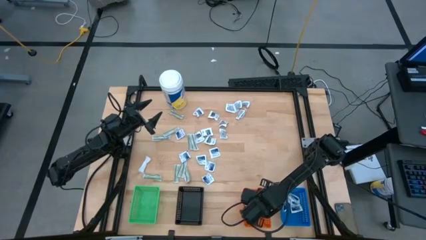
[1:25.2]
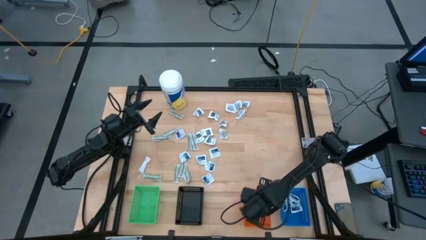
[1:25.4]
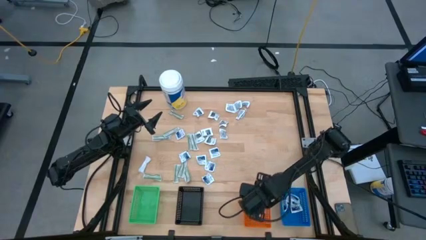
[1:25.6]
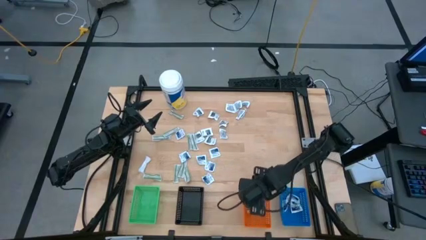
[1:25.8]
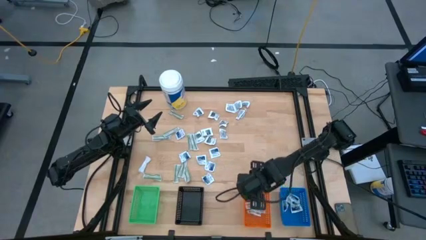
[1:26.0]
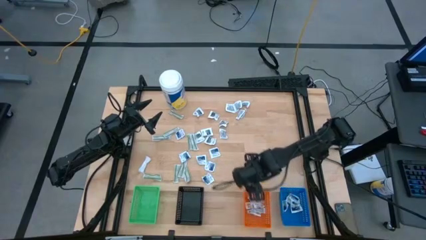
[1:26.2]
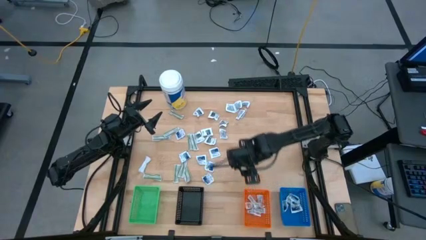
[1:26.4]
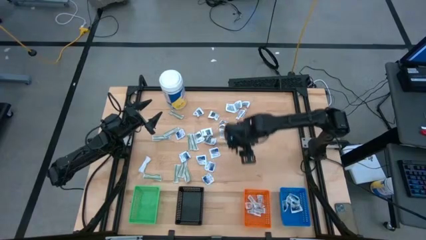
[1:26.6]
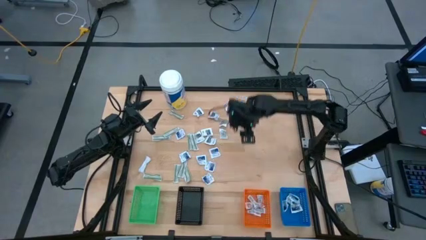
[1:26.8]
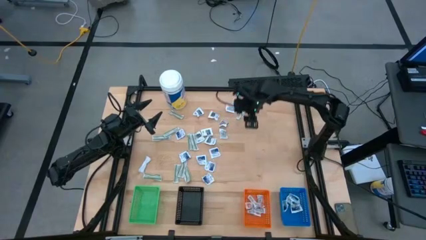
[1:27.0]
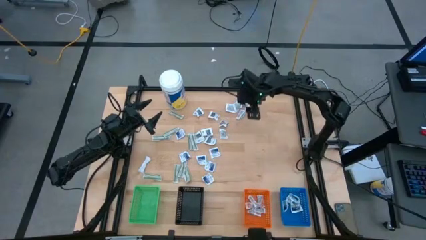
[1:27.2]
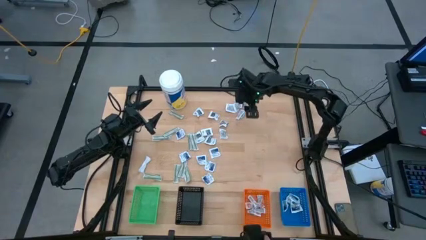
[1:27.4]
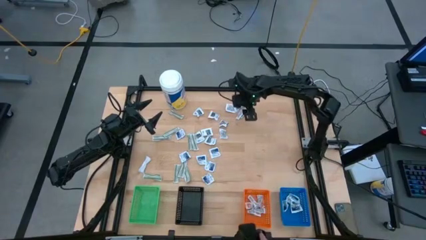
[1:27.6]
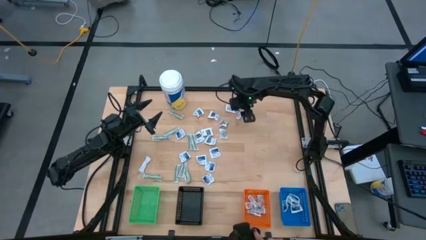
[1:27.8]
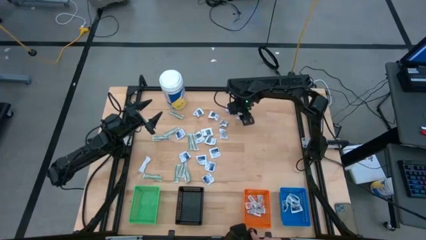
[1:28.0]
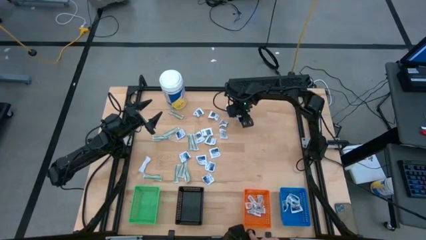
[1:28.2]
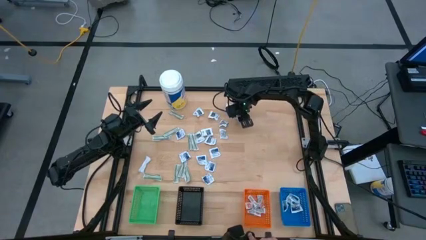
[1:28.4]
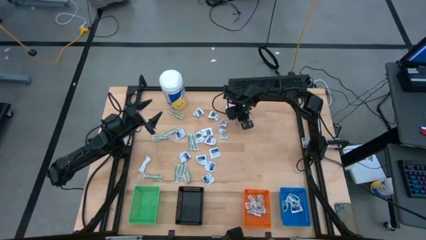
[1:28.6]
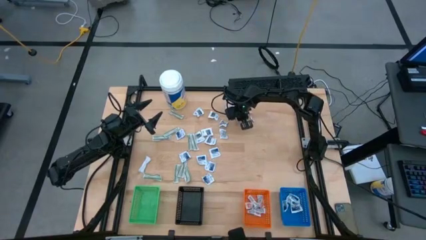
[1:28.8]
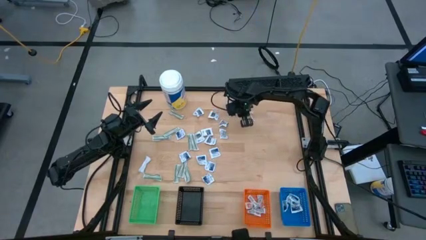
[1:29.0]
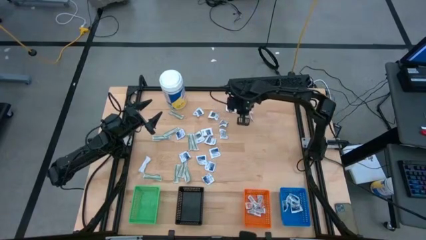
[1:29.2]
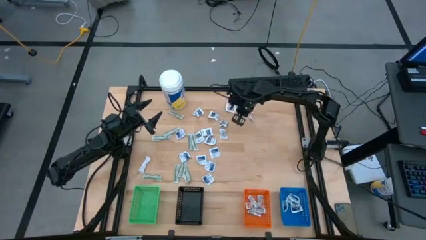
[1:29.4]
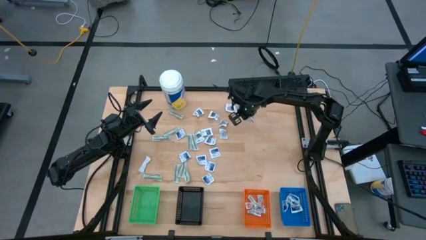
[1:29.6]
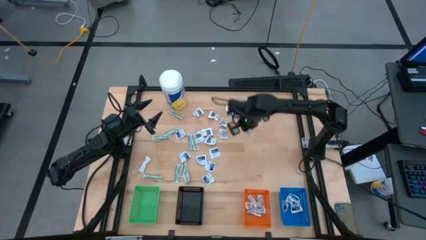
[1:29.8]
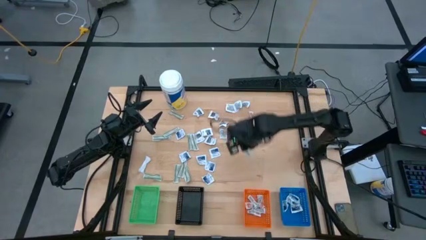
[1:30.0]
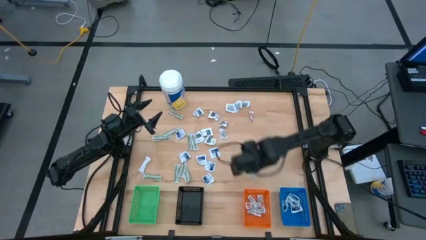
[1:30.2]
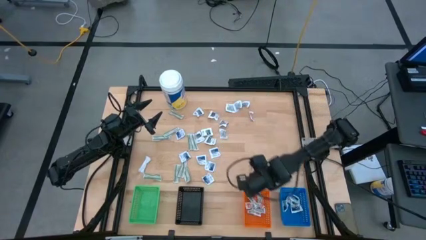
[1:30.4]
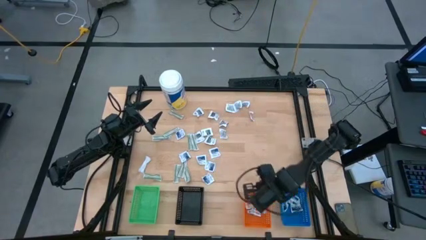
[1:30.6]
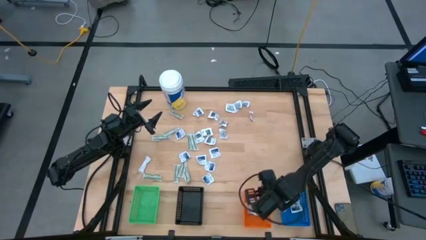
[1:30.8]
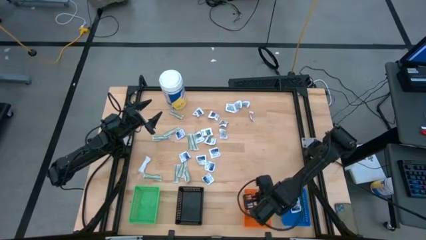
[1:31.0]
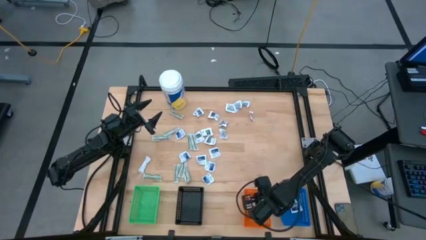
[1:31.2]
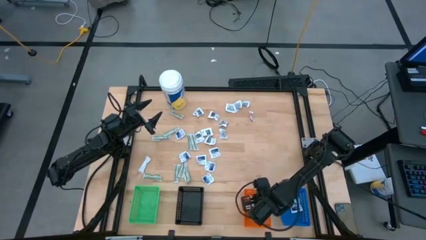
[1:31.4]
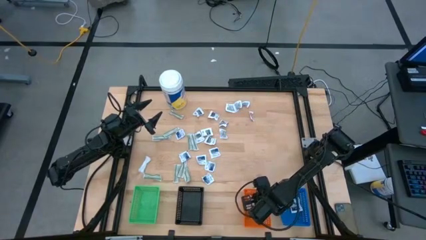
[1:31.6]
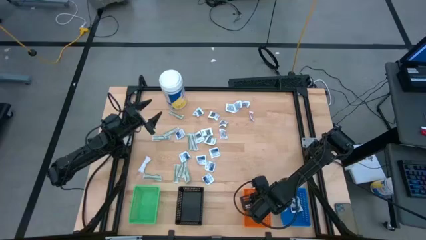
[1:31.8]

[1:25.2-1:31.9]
Task: Pick & Place First Aid Supplies
Put the ointment pack into the orange bin

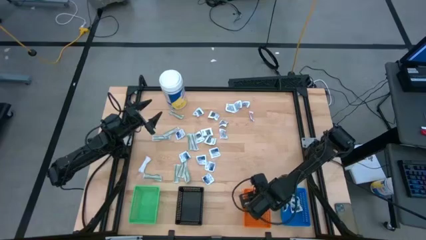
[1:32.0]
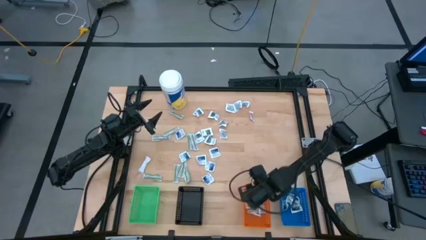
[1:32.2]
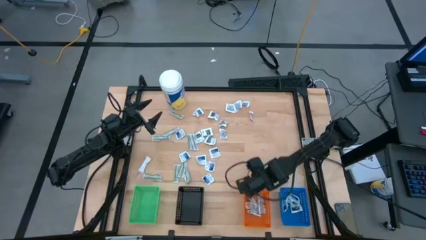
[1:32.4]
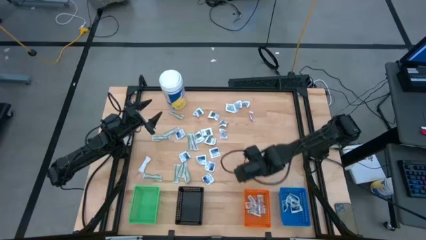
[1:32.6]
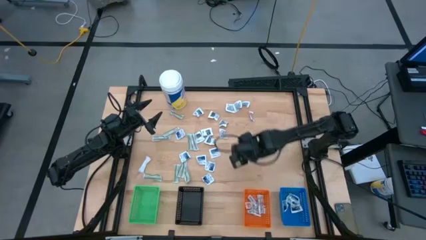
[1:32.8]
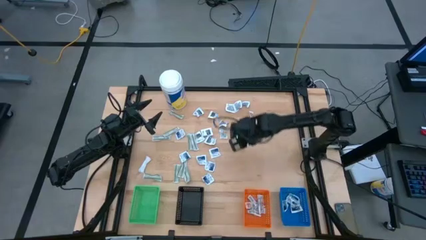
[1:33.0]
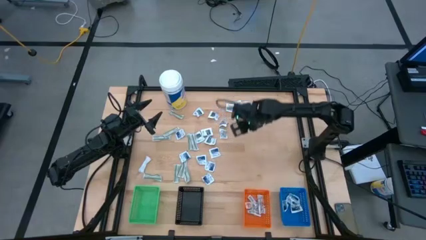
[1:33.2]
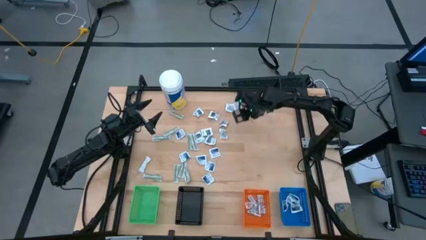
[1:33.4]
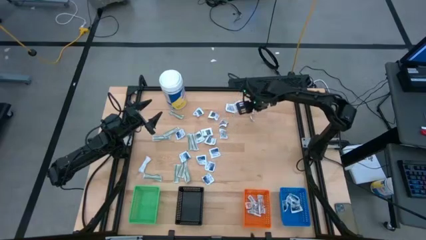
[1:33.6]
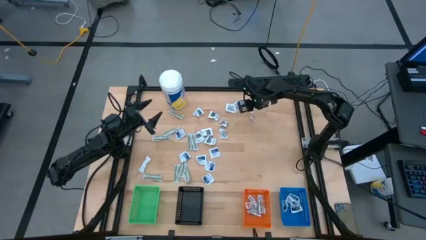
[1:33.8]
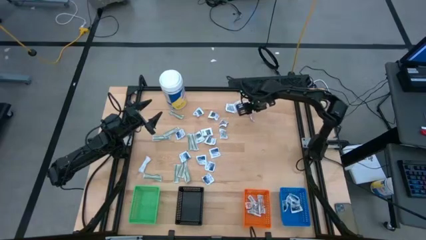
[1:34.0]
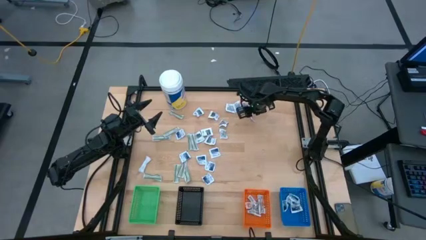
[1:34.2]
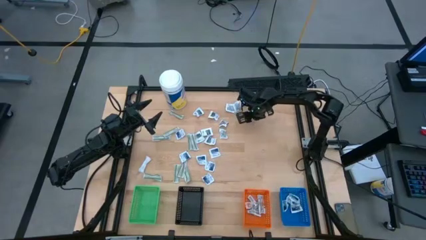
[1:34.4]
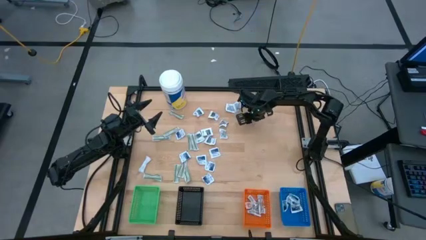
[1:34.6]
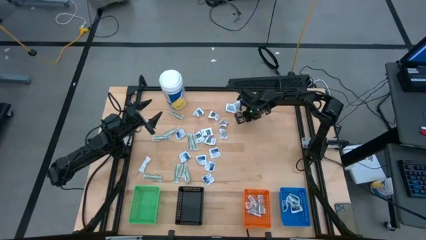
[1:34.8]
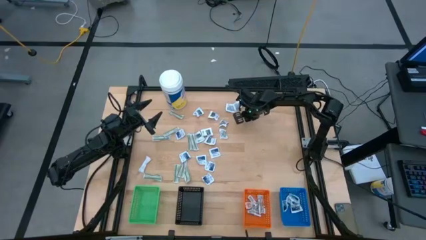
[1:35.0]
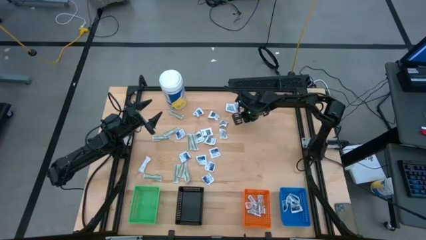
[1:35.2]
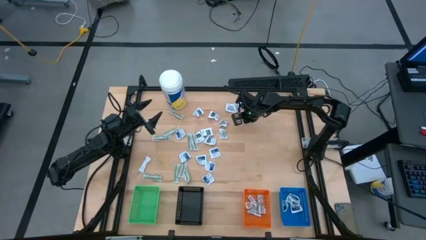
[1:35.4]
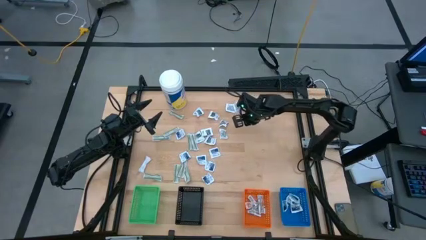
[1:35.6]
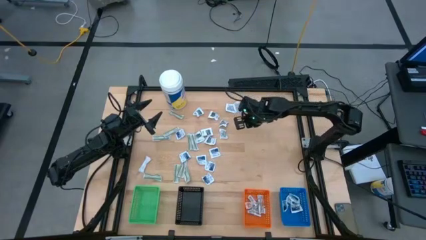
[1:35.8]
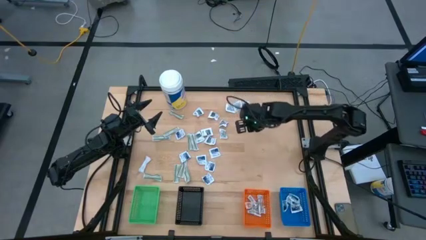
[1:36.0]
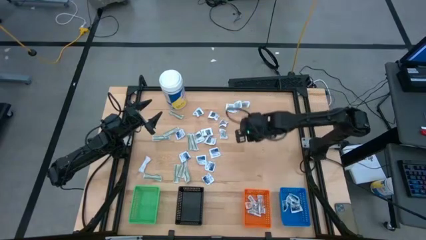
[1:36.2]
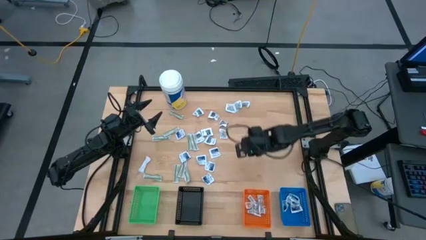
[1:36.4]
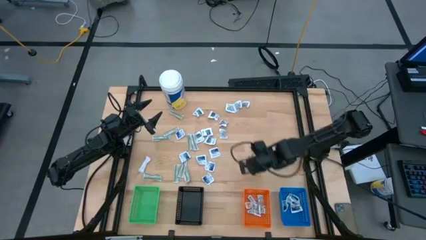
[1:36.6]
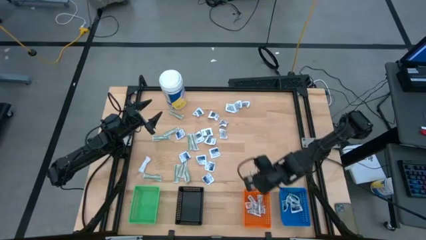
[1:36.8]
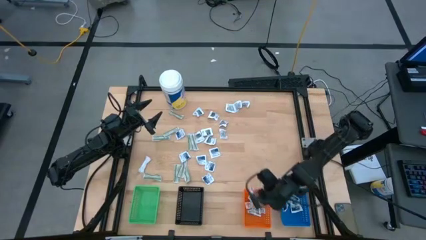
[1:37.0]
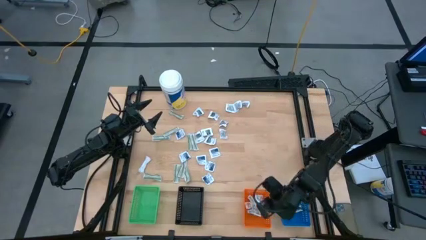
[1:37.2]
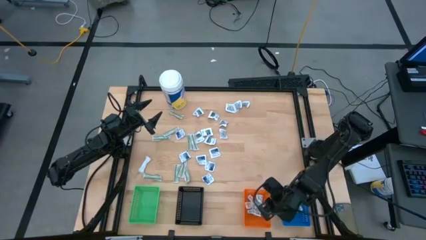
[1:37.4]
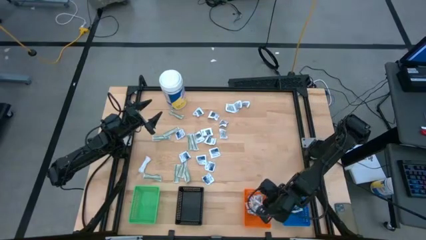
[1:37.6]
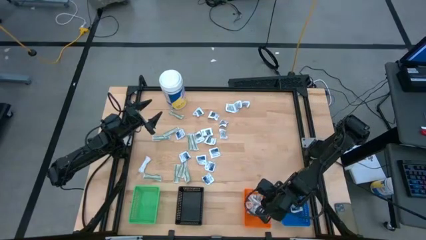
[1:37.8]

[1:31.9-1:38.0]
Put the ointment pack into the orange bin

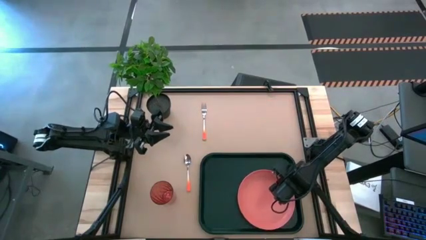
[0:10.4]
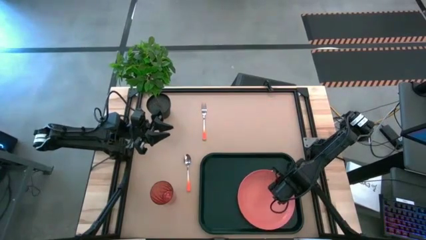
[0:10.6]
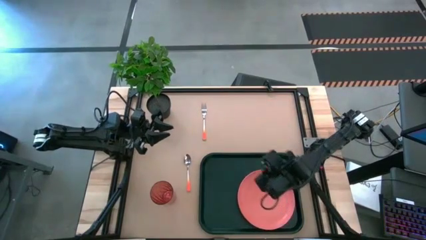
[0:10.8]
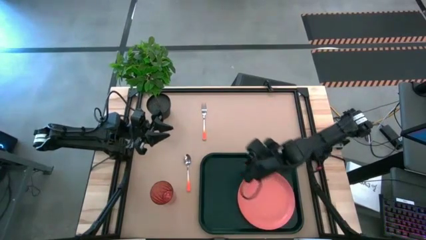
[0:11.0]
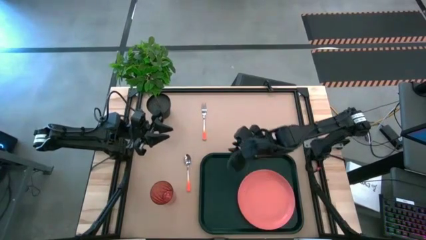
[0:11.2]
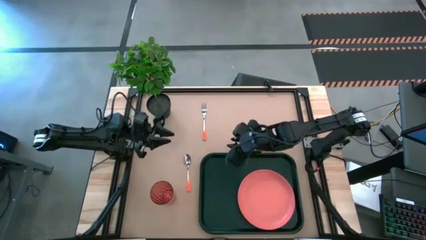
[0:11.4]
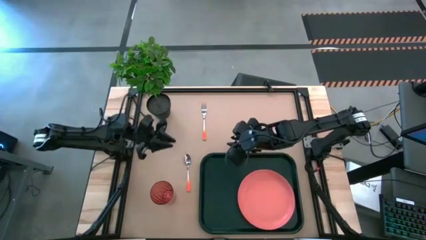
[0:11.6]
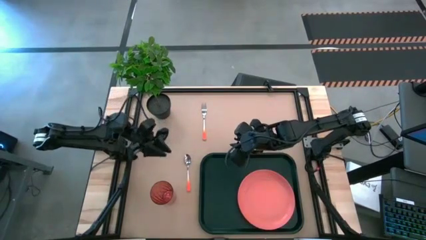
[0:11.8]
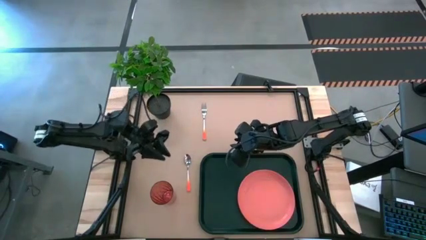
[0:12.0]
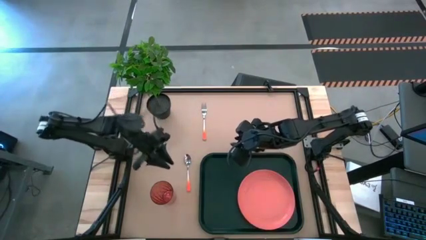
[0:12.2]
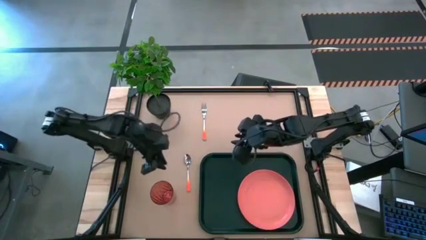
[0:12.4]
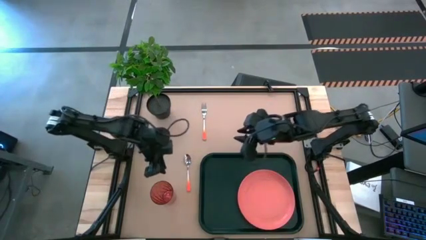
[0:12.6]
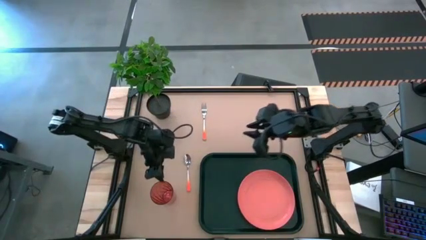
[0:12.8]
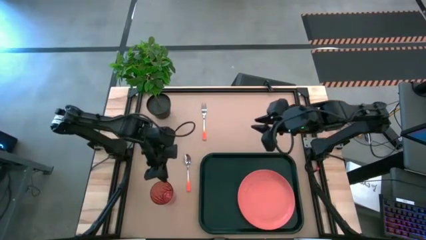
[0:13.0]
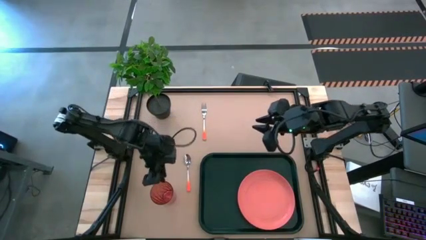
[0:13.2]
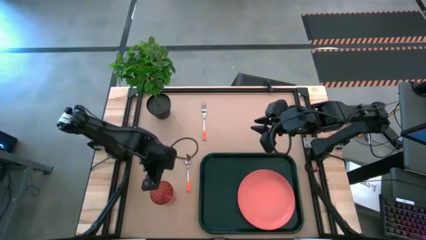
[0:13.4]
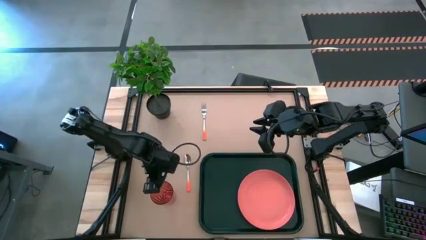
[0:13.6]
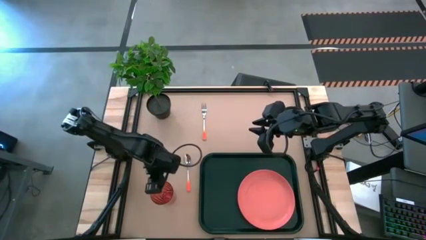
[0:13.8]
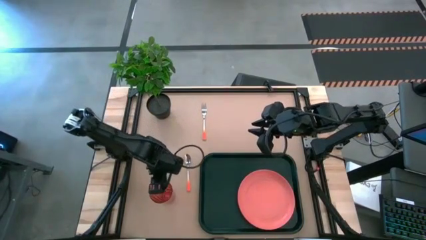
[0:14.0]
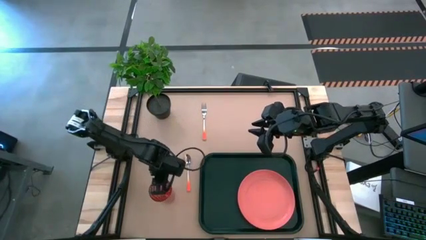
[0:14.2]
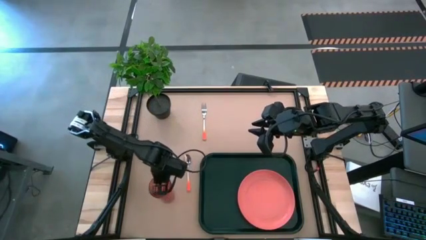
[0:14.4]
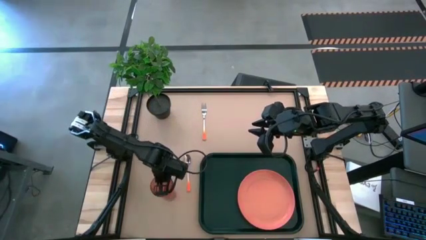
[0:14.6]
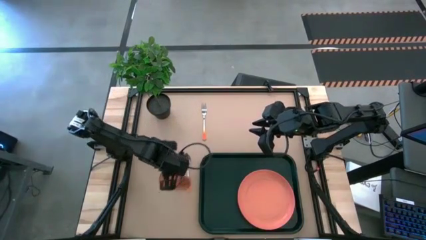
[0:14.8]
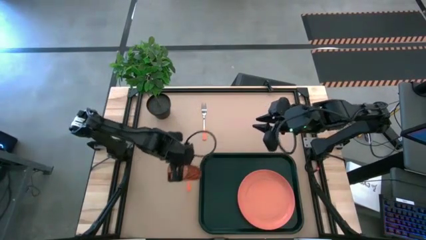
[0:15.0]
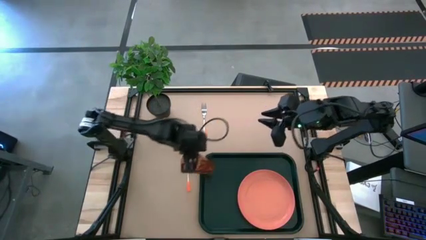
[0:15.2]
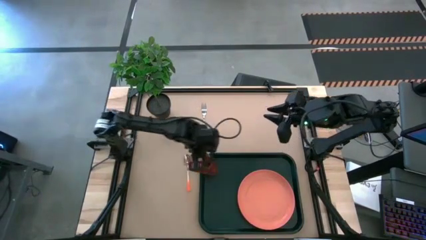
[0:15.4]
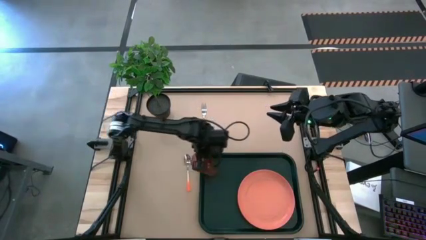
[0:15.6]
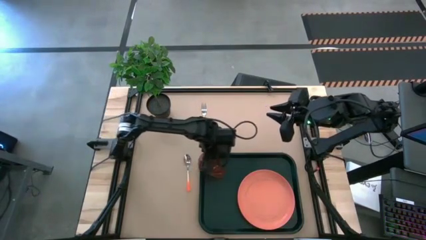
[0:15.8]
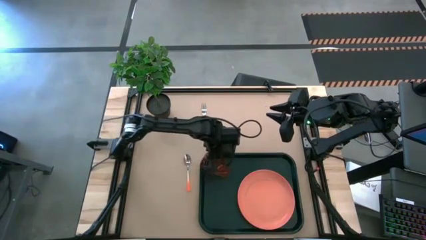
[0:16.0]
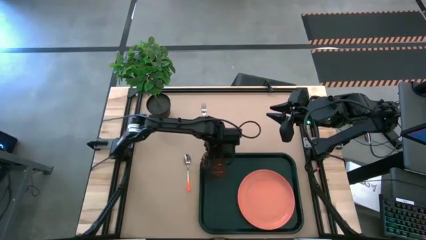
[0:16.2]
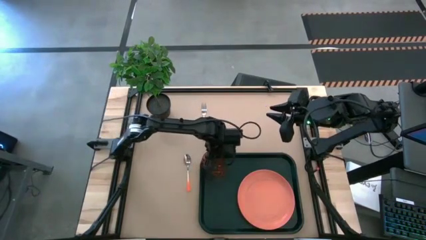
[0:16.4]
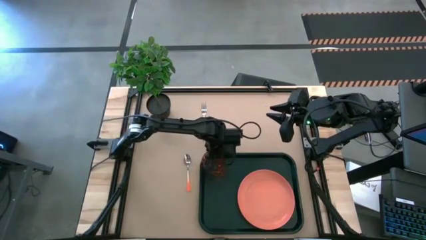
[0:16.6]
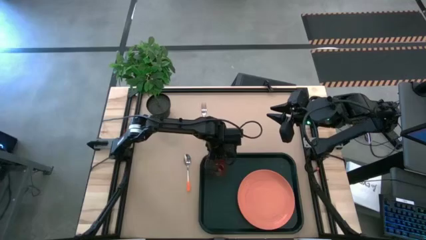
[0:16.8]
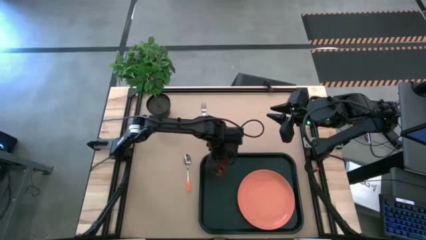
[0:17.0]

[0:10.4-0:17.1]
Task: Pick and place plate/cup/fork/spoon on tray
Put the orange cup on the black tray to the top left of the pink plate
